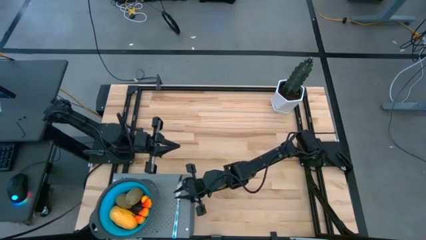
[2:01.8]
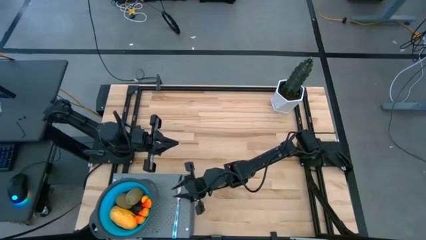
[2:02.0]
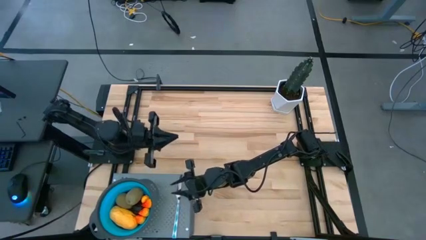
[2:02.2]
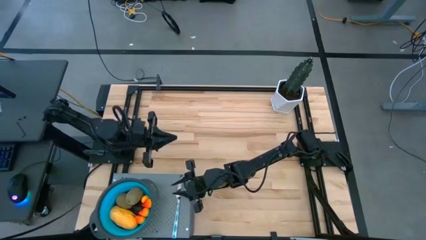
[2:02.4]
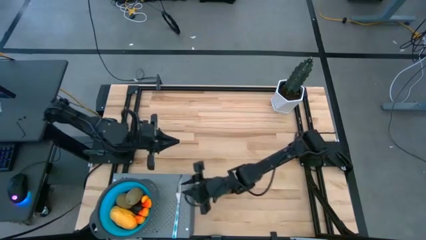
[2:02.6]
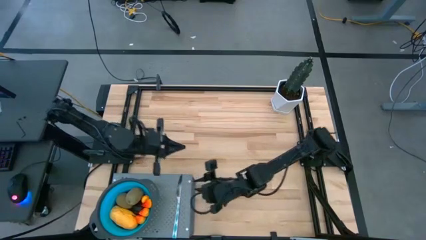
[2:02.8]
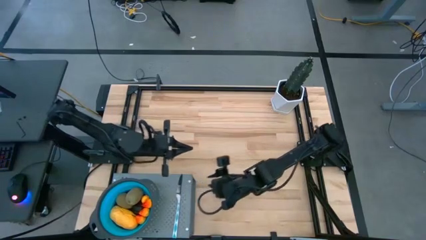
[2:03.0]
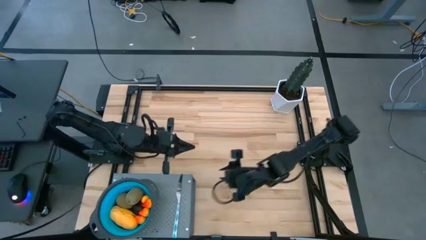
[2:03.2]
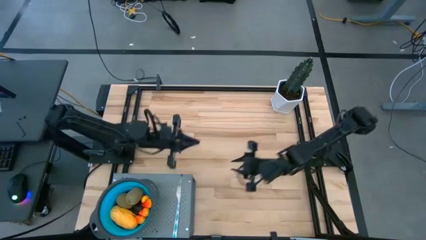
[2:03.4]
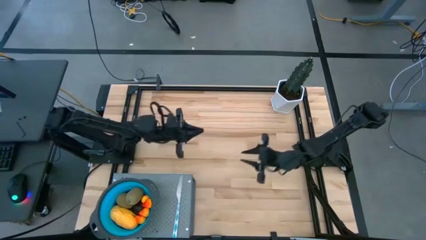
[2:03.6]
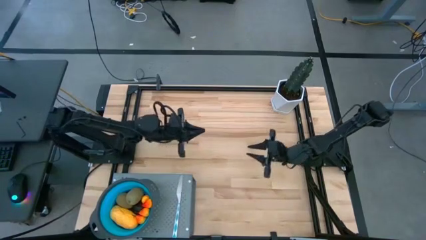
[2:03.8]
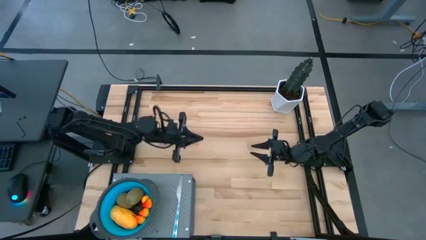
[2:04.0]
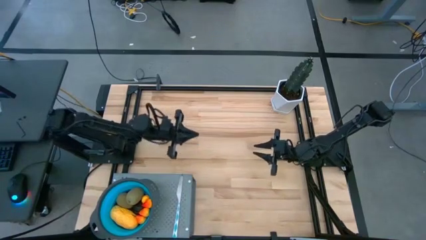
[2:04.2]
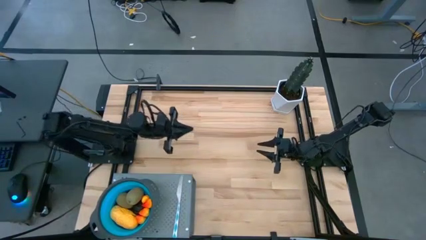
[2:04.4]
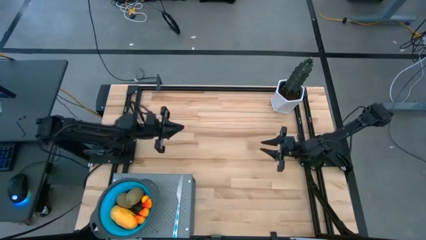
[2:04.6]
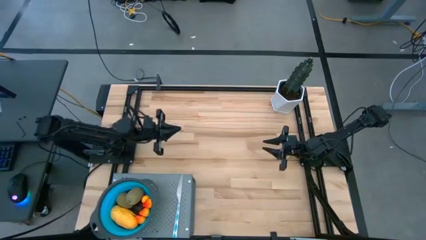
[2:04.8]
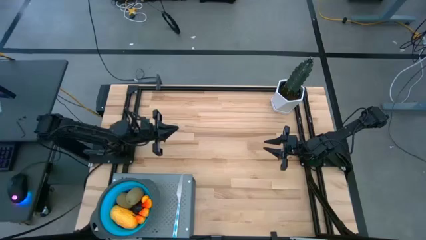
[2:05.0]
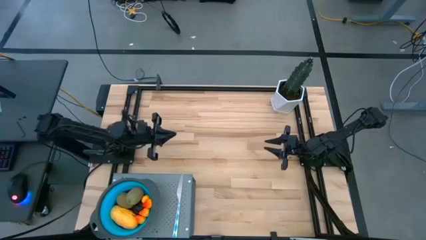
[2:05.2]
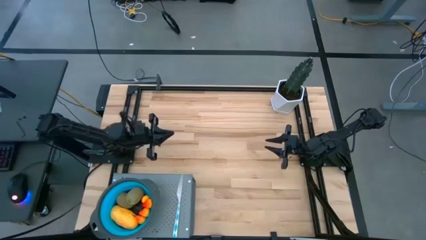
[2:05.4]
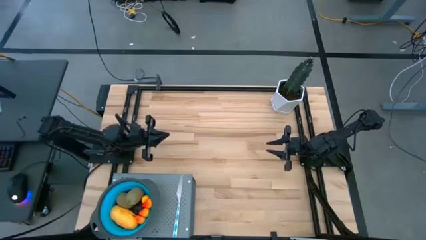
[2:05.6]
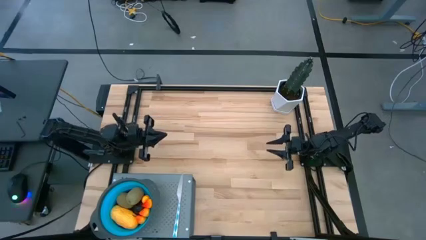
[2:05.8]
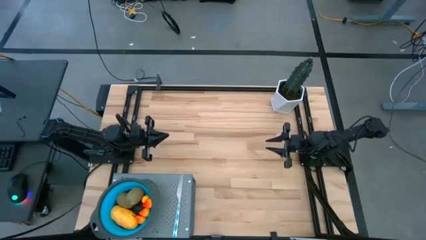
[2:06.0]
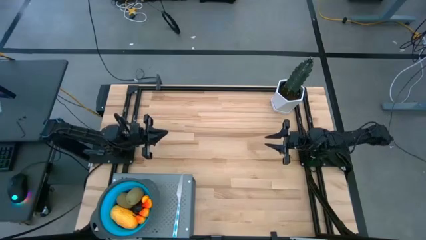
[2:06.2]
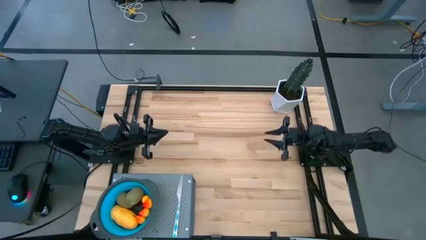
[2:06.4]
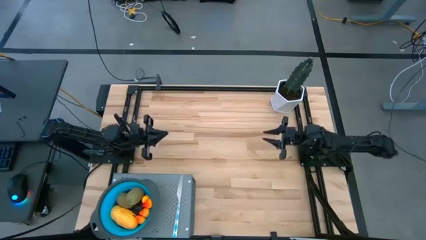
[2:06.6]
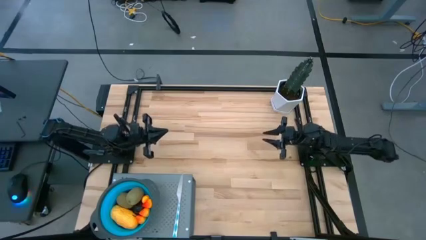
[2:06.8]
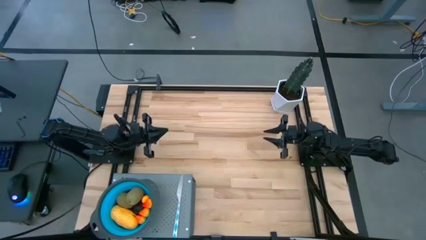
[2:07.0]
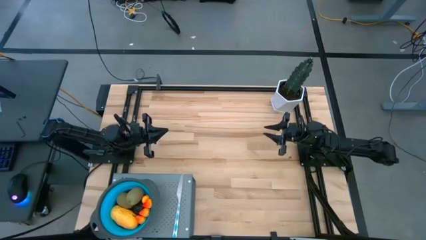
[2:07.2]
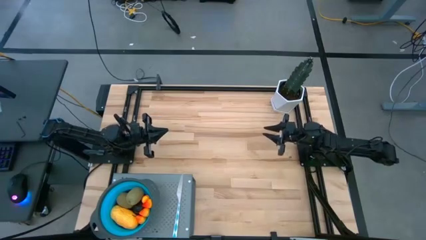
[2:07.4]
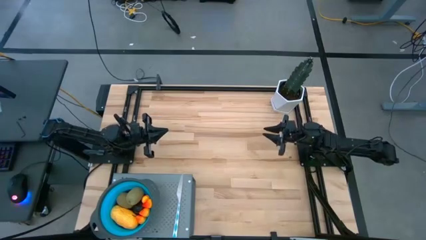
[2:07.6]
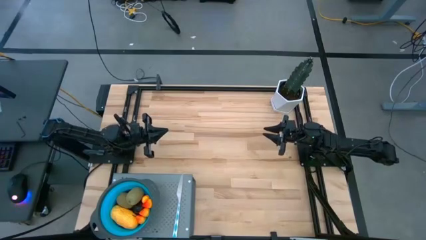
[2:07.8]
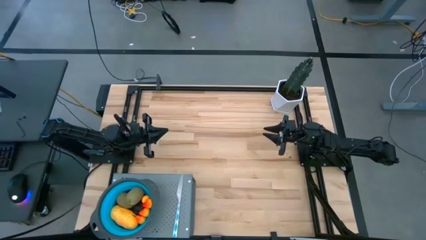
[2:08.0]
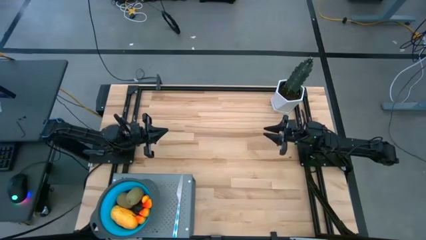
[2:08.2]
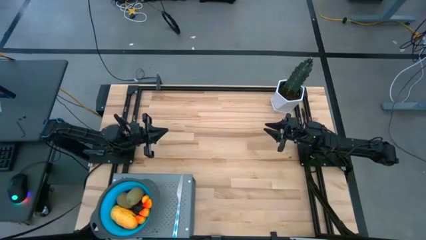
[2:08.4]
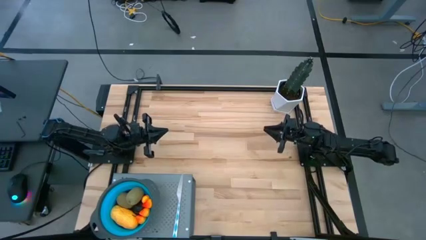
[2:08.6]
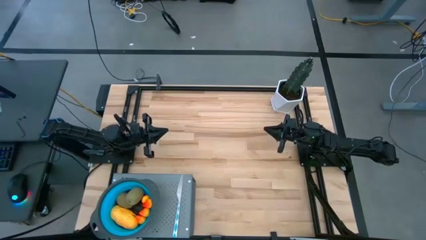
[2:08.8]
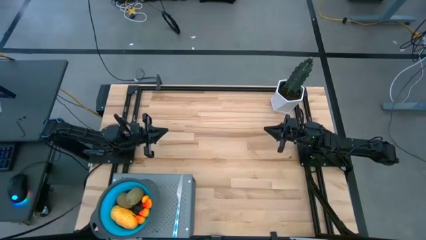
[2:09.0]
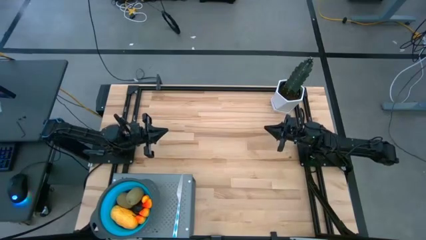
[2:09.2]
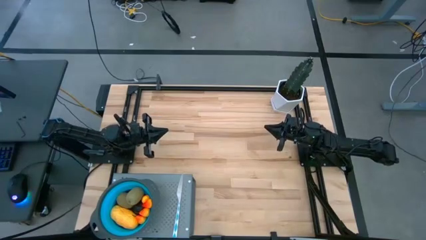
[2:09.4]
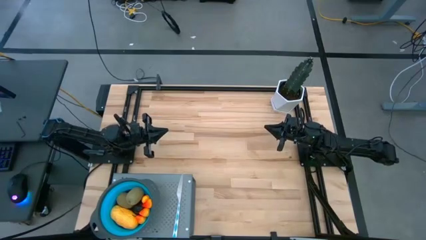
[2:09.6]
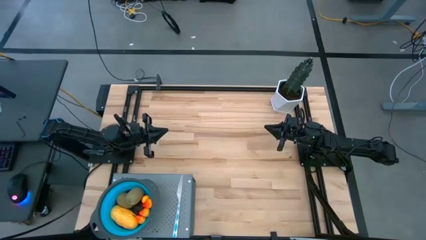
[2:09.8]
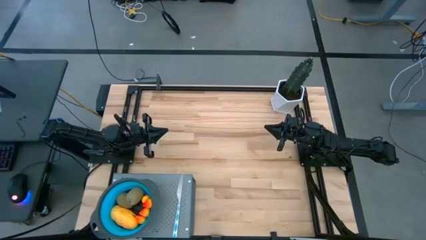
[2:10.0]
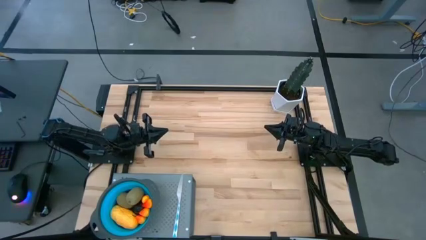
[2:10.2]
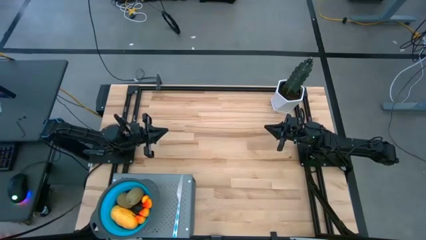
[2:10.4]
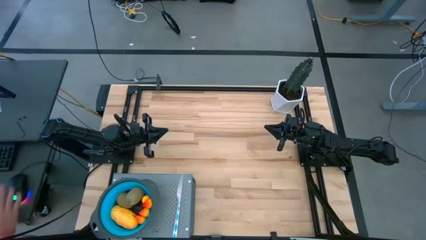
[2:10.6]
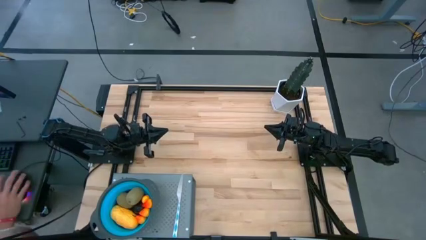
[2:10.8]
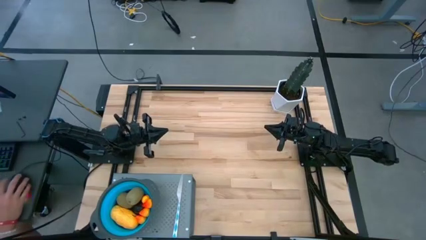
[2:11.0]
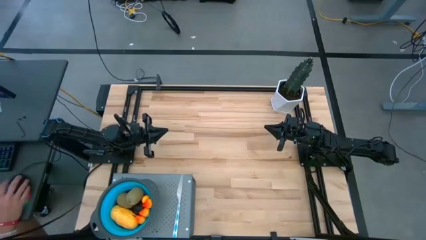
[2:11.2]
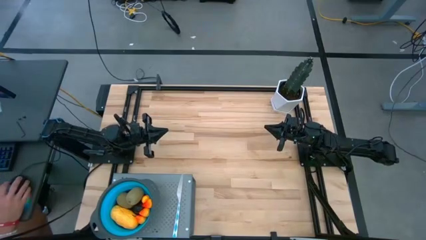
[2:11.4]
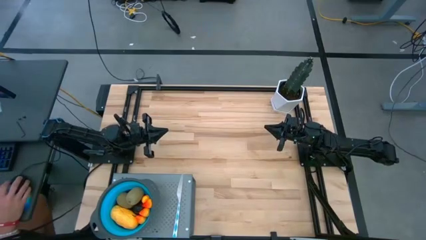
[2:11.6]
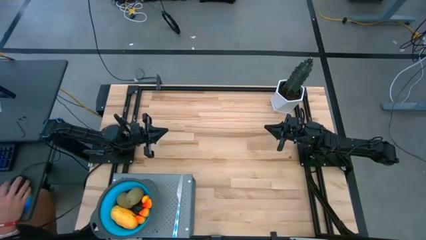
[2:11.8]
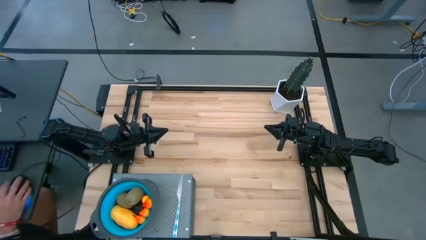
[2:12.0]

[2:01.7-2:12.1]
Task: Pick & Place Fruit
Return to Home Position

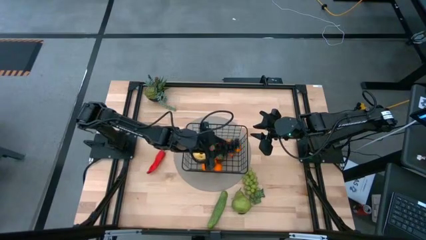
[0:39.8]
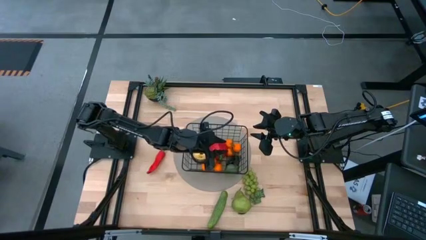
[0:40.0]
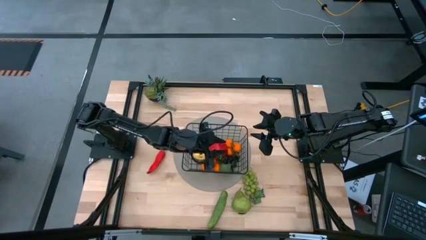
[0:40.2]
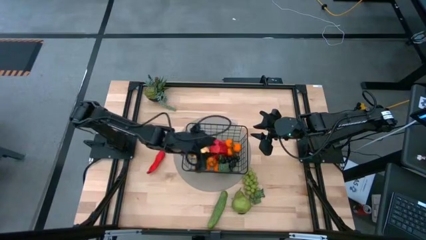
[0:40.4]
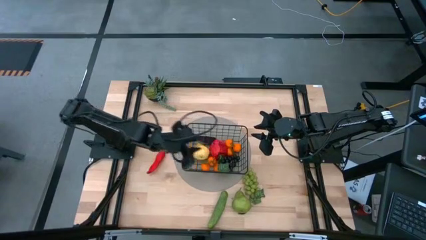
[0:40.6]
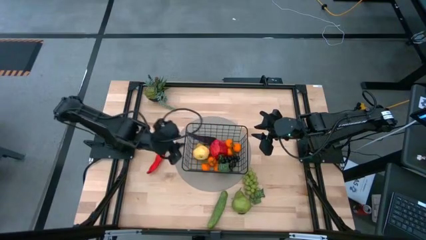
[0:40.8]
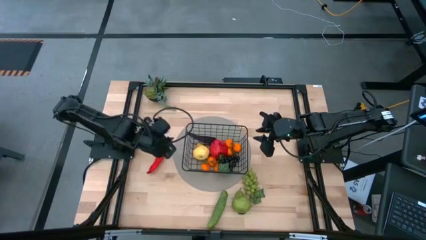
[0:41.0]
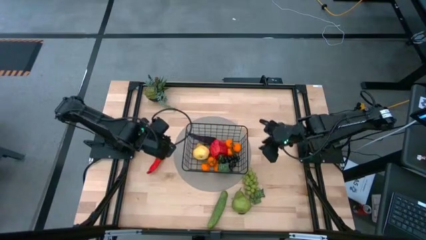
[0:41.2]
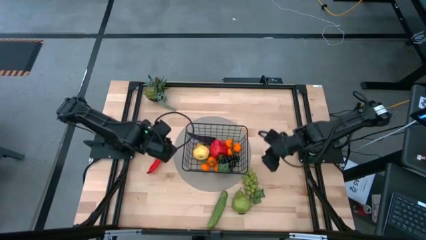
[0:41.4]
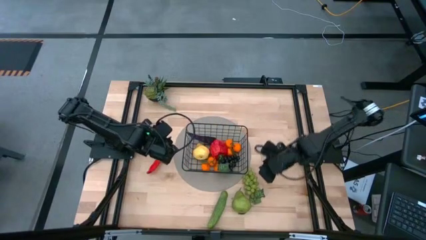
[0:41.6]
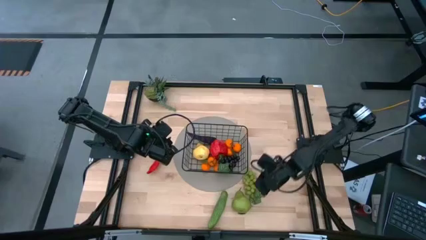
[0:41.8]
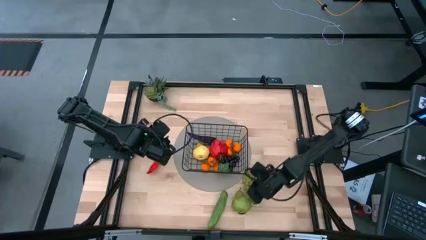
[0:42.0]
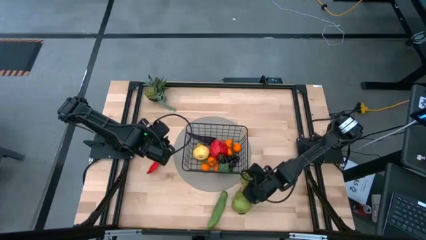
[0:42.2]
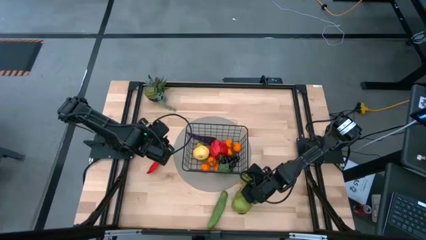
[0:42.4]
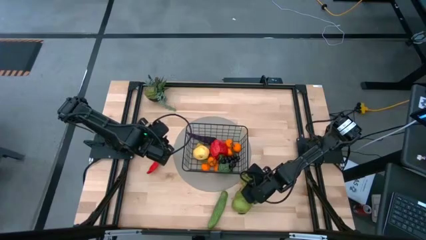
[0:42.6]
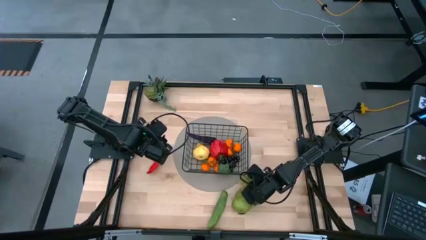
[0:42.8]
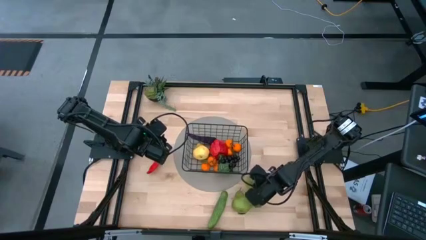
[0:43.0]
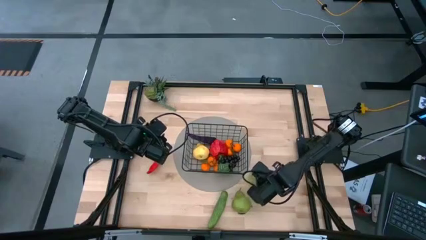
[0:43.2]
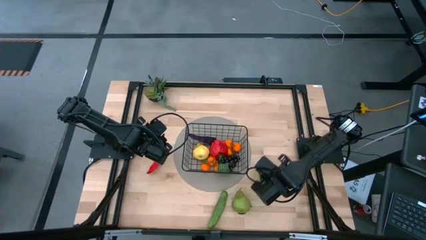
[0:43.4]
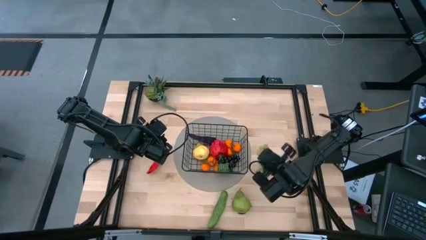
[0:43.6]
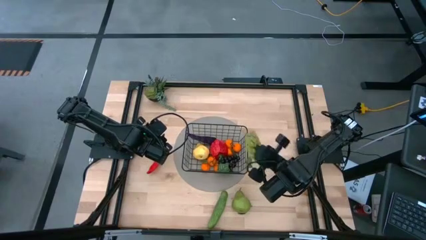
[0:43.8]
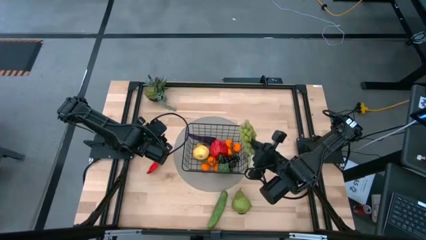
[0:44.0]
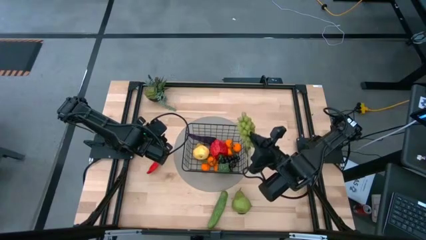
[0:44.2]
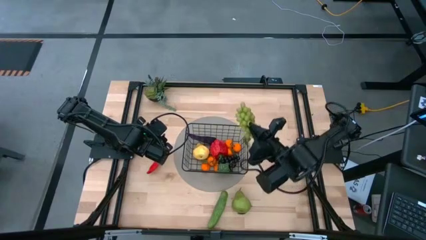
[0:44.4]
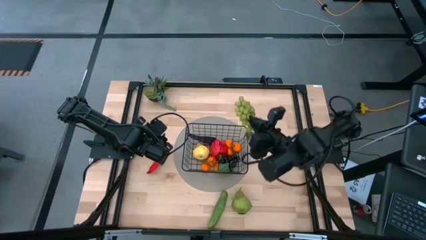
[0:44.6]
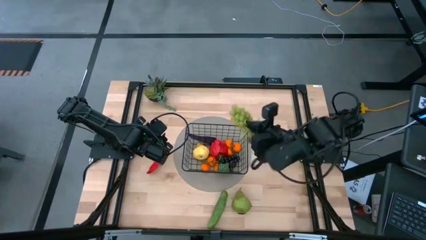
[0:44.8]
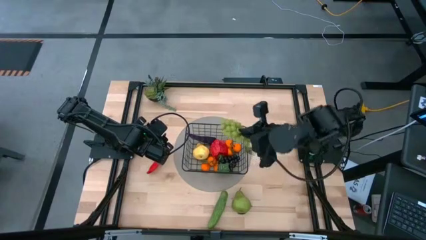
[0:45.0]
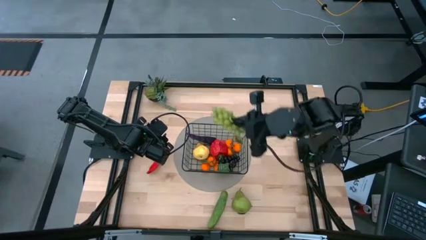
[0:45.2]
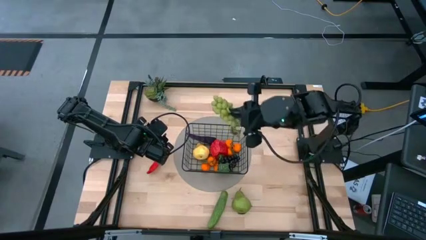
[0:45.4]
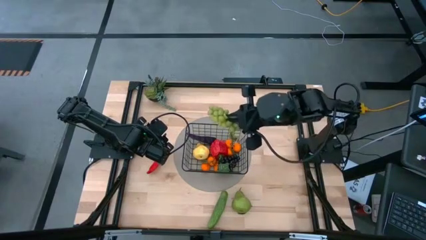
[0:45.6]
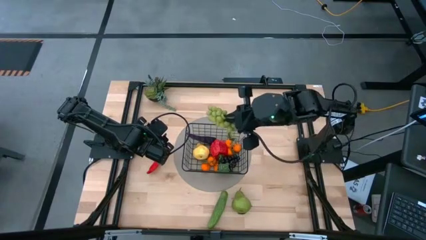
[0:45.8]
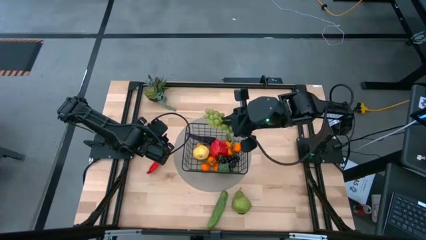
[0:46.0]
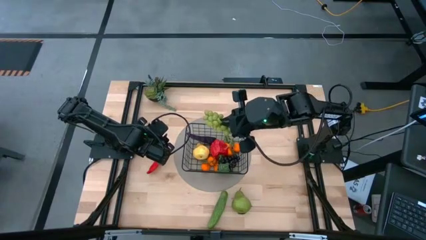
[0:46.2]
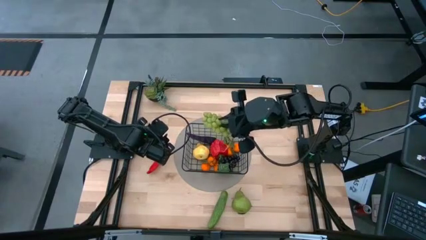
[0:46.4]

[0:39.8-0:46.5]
Task: Build produce basket
Put the green grapes into the black wire basket
